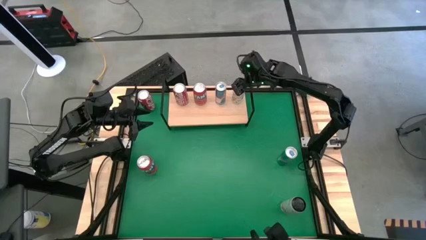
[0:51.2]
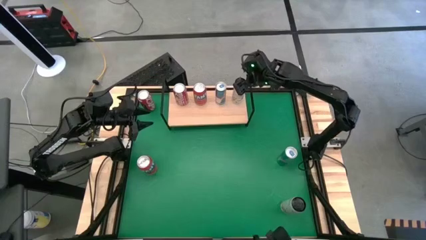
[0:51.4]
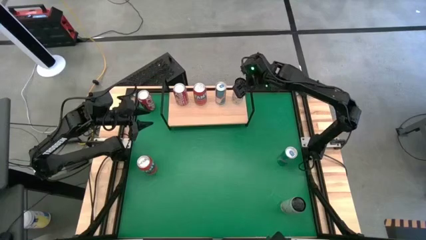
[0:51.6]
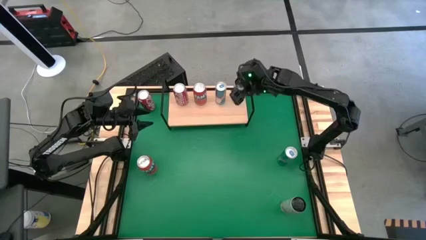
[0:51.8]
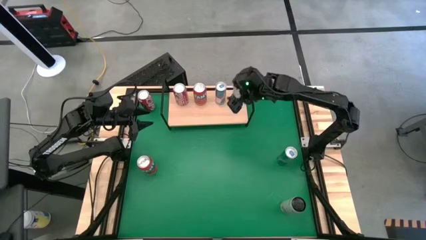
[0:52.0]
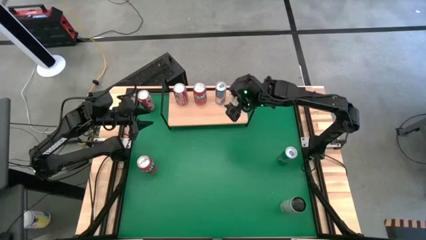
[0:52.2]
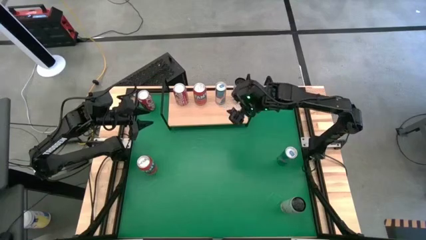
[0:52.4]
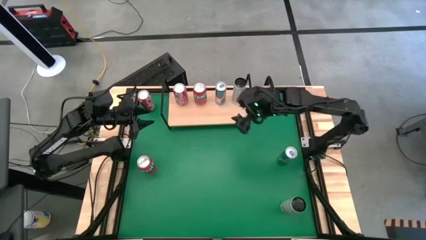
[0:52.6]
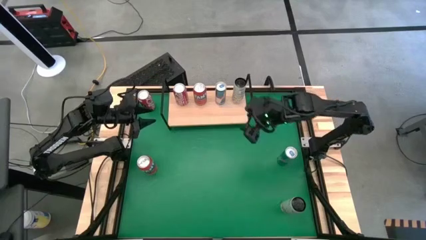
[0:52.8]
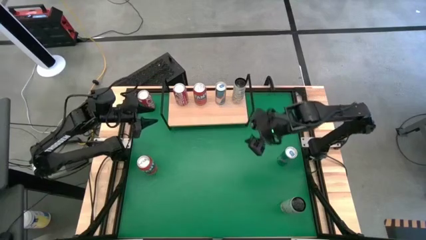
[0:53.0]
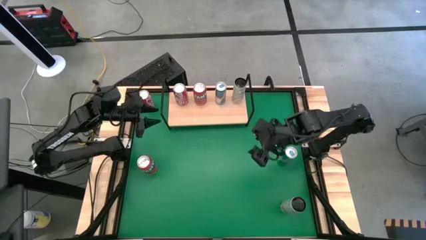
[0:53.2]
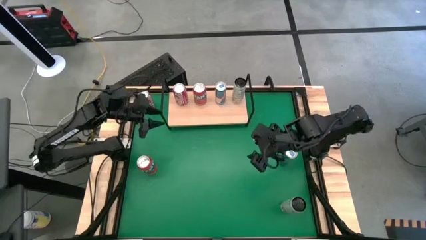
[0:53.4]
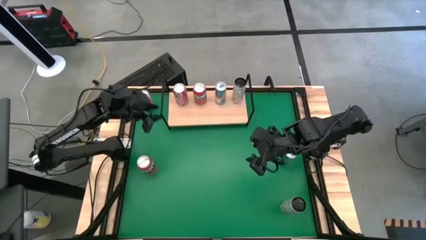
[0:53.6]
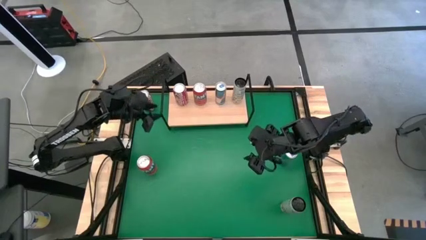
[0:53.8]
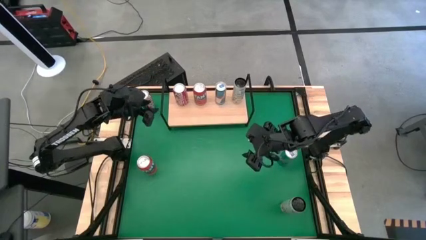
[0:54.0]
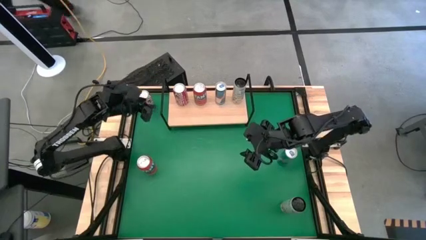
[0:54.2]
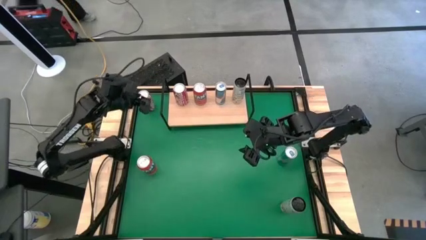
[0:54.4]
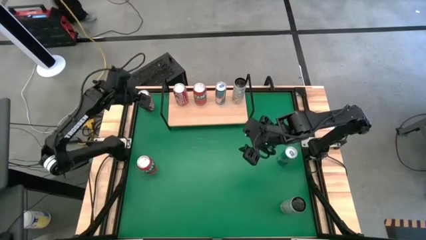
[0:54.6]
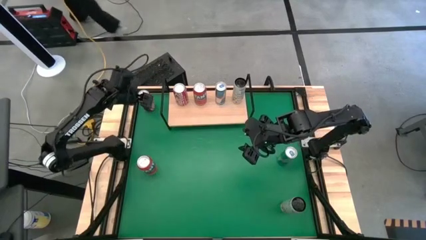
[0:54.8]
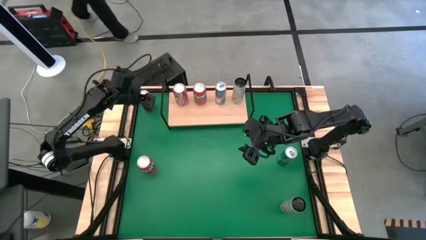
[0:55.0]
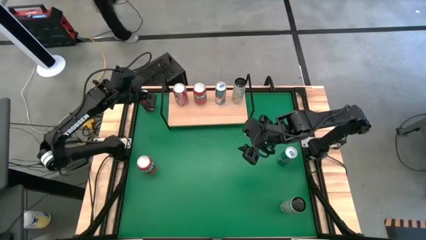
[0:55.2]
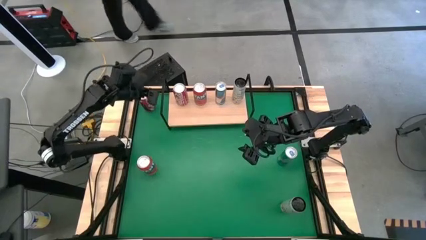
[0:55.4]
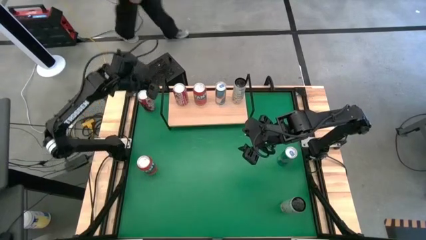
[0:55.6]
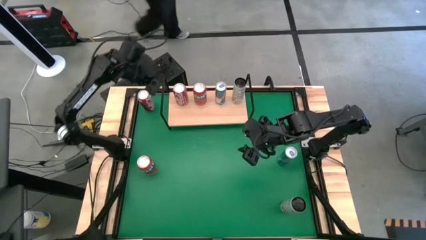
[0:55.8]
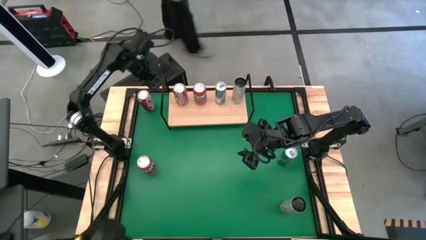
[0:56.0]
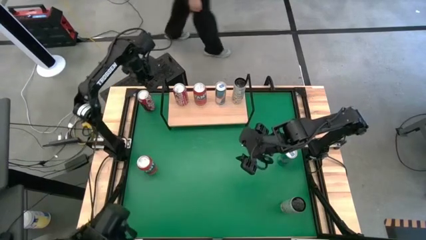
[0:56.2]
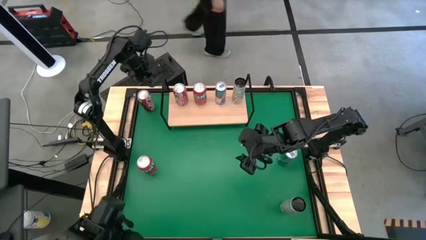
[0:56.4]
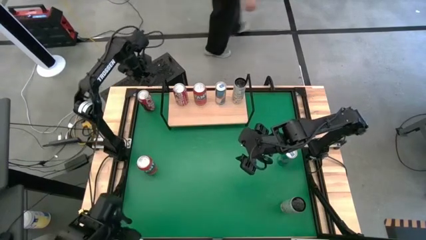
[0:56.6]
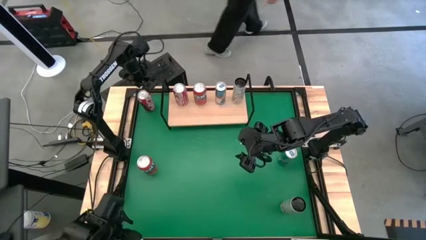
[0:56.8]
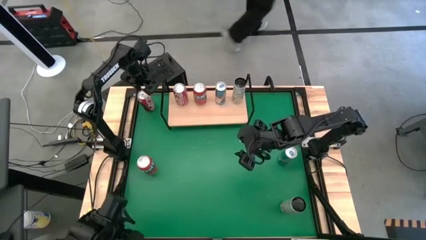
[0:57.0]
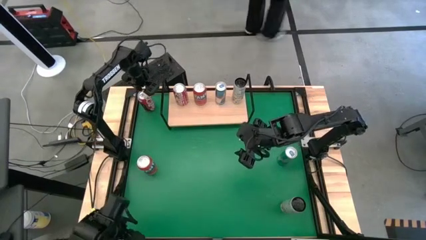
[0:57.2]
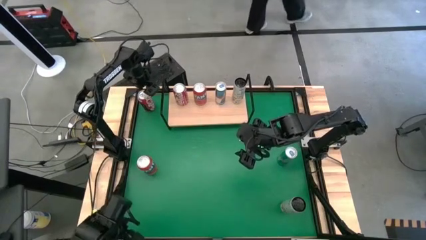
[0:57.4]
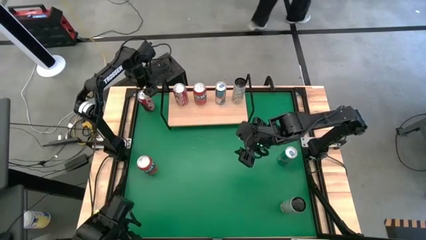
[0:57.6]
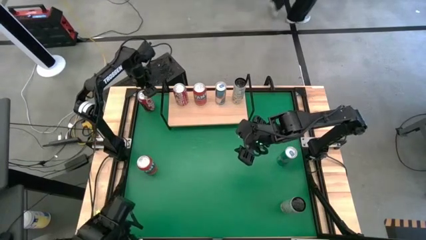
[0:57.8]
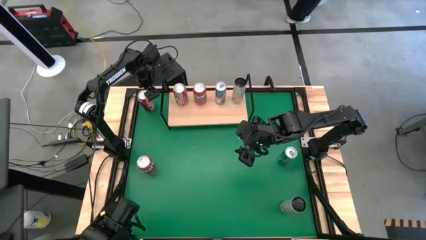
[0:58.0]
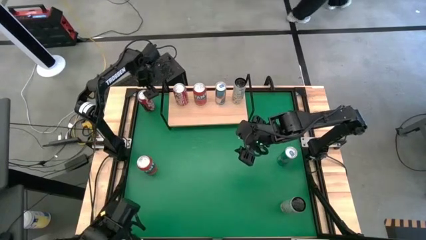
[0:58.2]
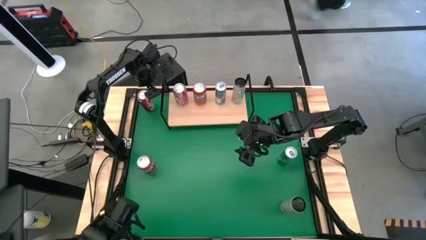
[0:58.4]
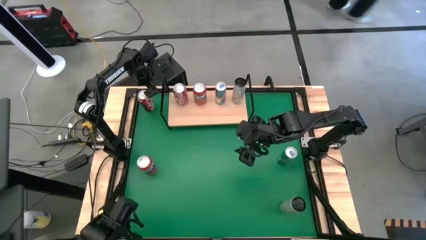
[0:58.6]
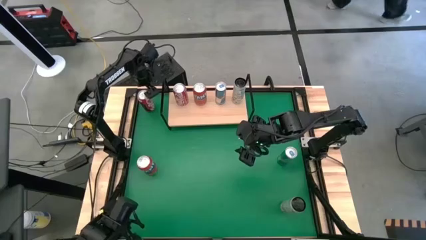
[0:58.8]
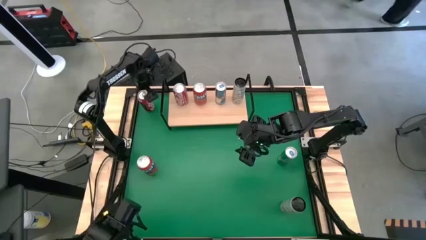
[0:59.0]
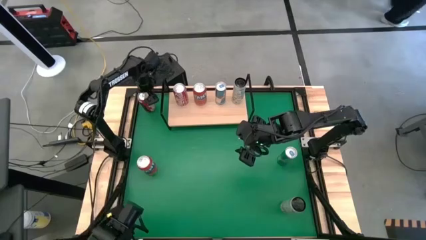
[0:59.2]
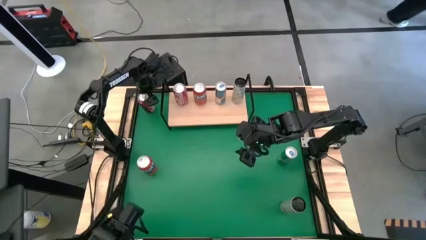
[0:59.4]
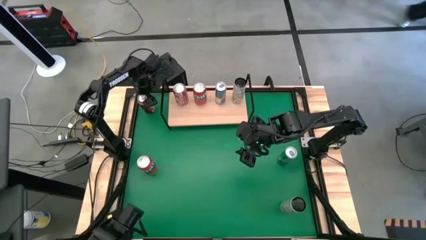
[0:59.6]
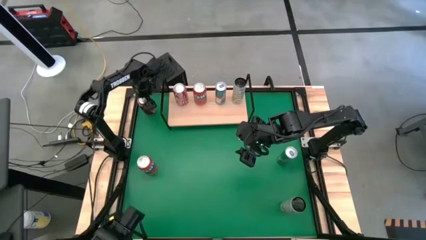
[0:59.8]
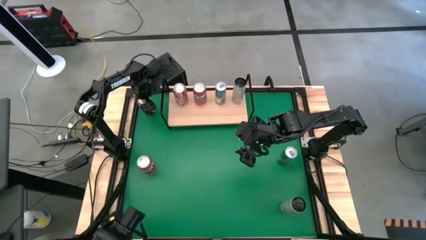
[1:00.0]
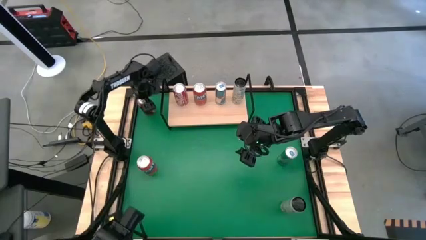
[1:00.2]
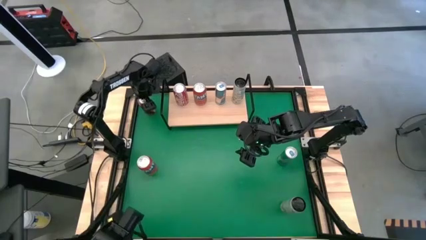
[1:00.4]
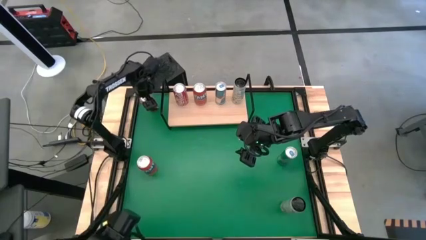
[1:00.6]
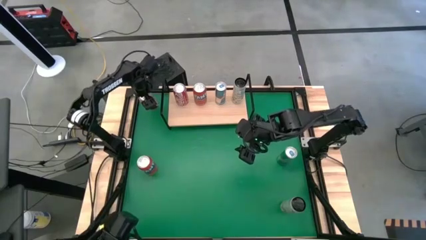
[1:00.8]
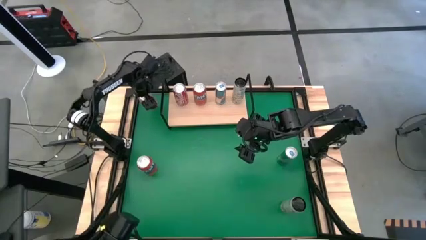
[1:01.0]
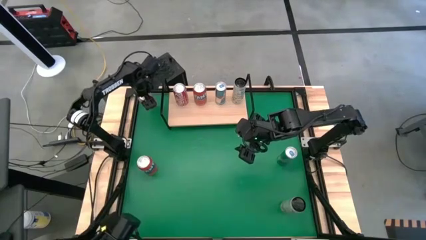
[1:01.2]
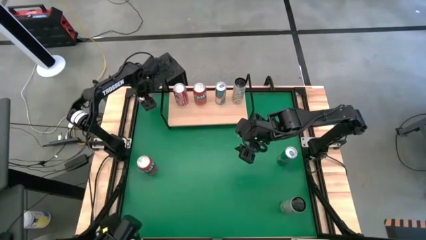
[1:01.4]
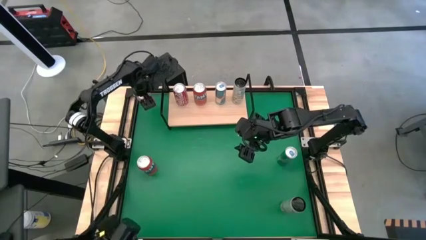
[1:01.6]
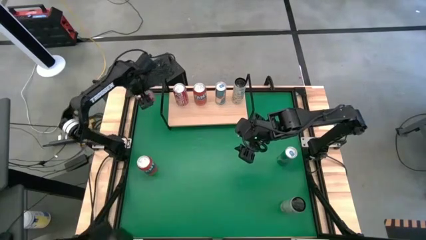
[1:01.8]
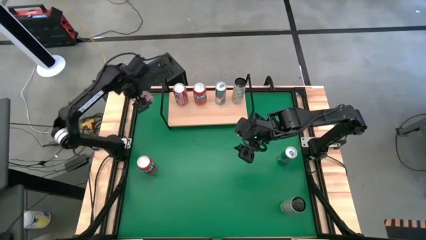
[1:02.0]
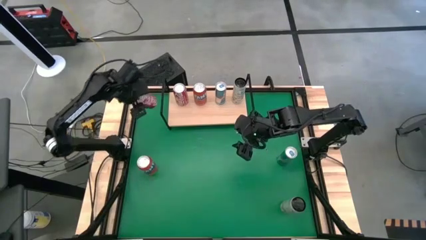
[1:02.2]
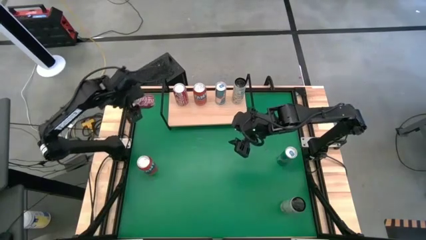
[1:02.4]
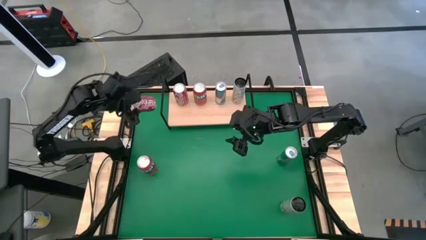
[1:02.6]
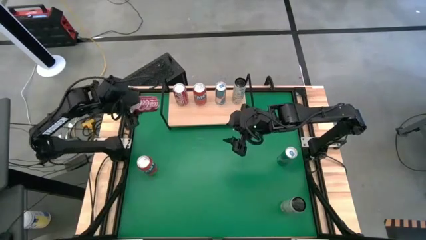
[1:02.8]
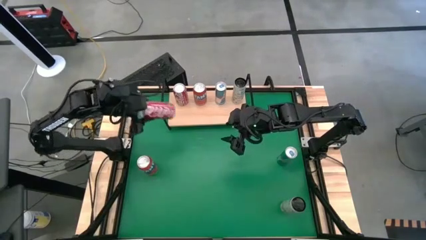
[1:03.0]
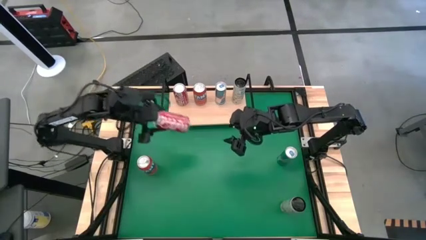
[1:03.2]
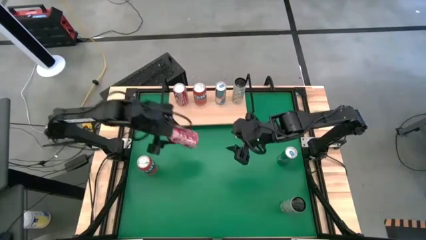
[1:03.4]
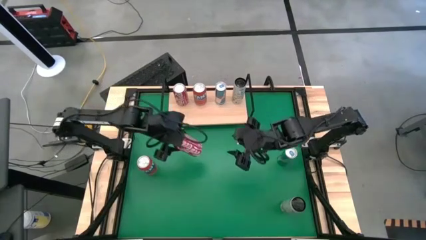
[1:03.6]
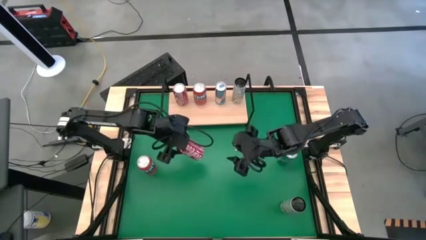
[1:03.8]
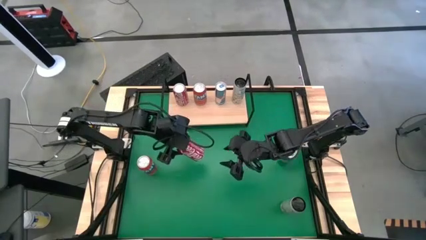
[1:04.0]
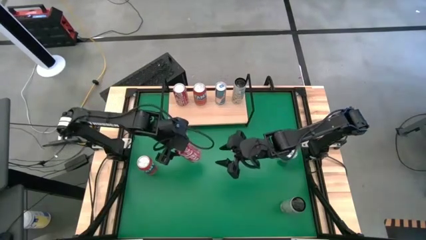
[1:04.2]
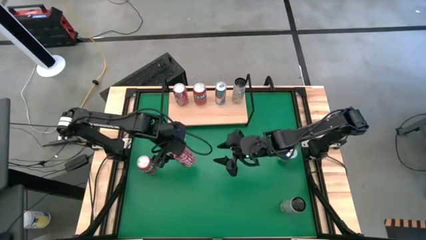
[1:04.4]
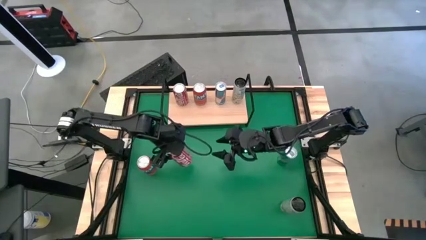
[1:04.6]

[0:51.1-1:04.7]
Task: Place canned beverage on shelf
Put the red-black soda can on the shelf aligned with the other red-black soda can

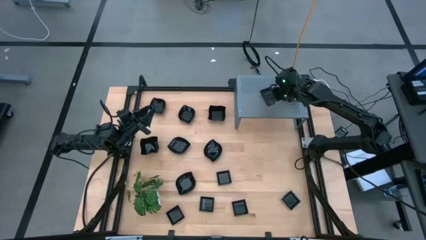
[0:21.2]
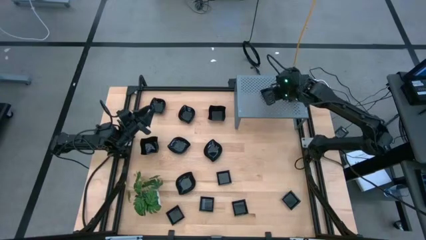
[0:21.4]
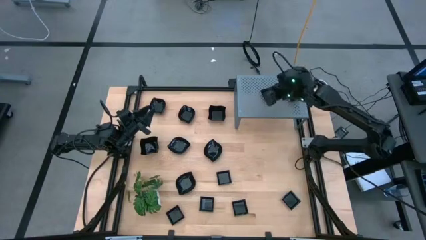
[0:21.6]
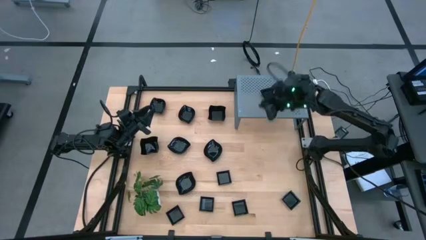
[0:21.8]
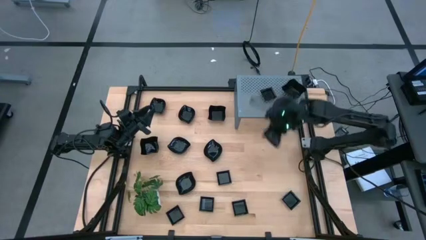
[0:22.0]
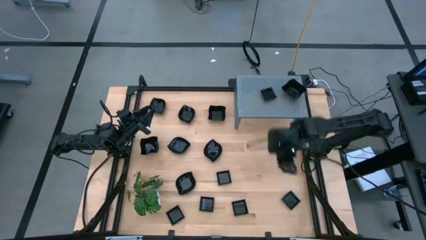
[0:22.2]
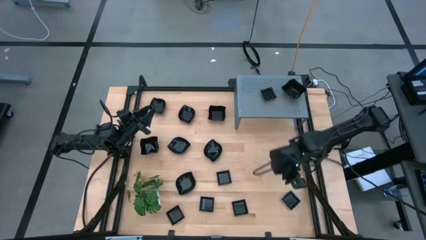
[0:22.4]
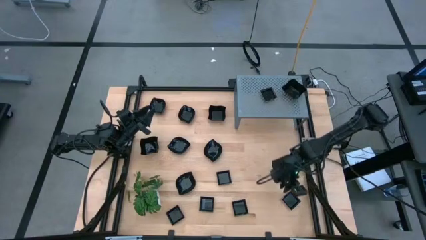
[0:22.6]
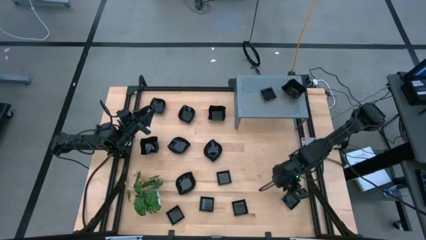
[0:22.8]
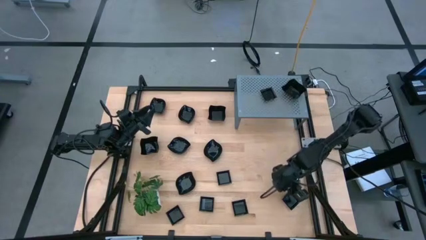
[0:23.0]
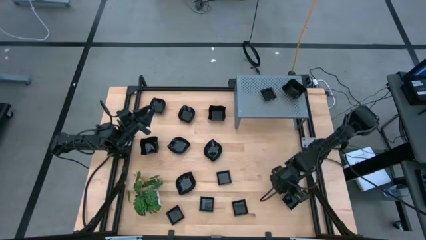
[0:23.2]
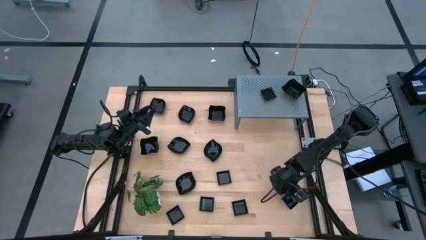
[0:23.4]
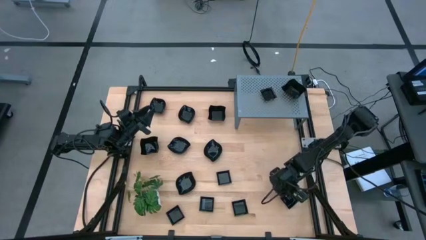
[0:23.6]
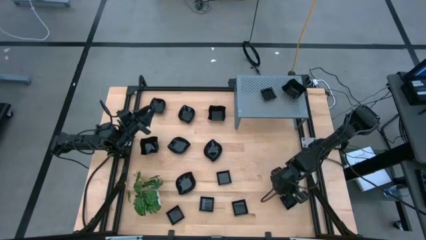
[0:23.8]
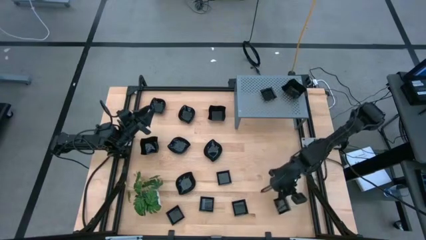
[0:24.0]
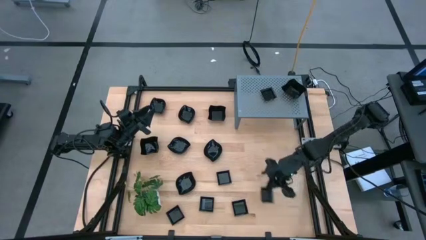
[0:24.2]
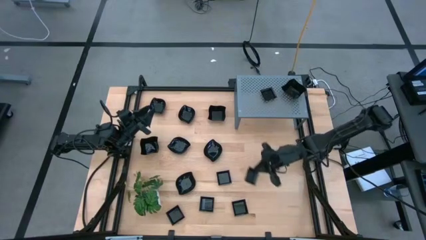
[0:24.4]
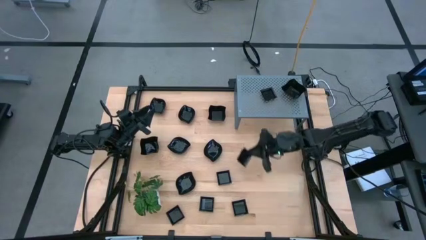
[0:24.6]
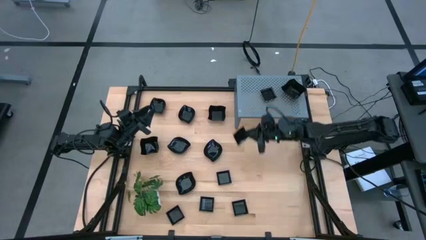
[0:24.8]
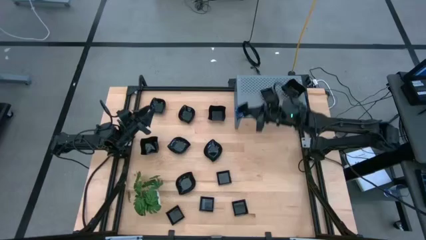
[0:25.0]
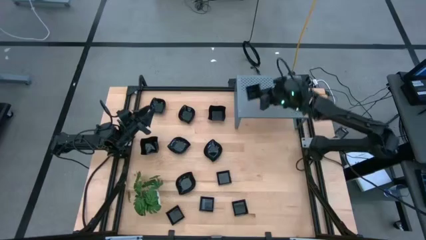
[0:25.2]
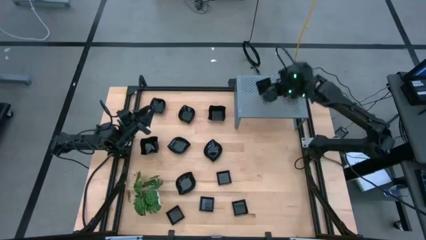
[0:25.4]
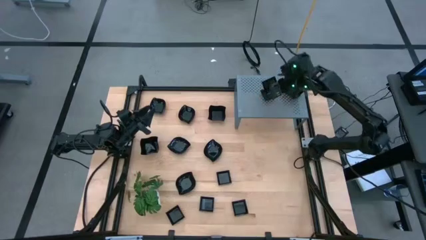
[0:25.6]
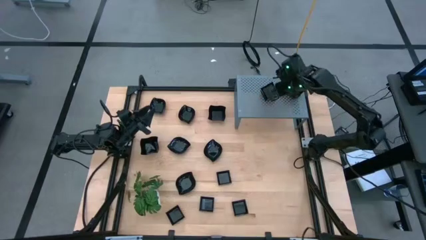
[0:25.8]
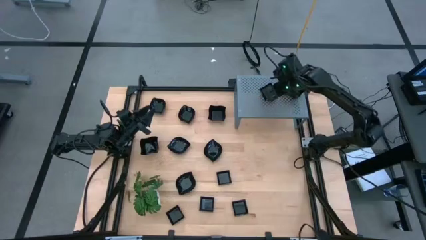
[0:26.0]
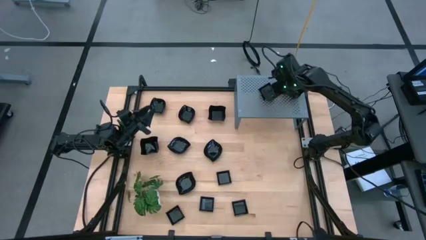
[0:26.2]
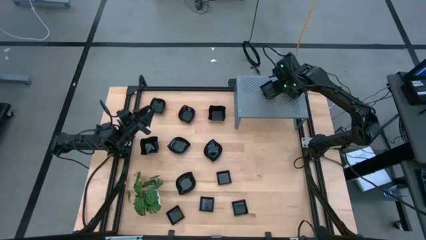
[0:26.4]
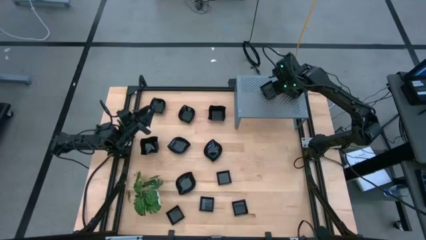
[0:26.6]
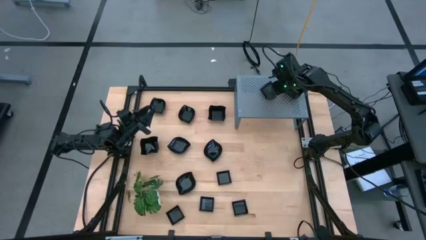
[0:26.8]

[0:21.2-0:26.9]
Task: Pick & Place Mini shaped plates
Stack the square plate on top of the other square plate
